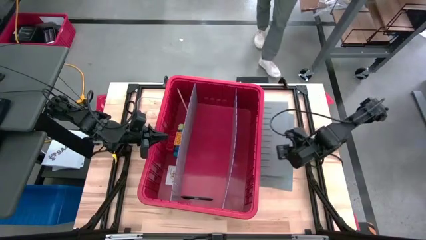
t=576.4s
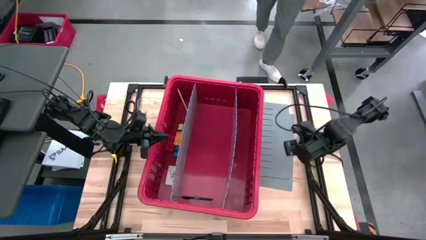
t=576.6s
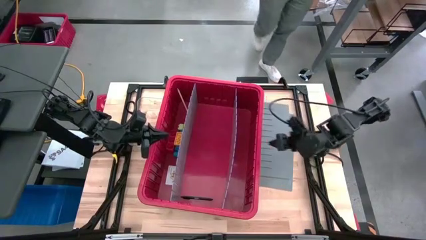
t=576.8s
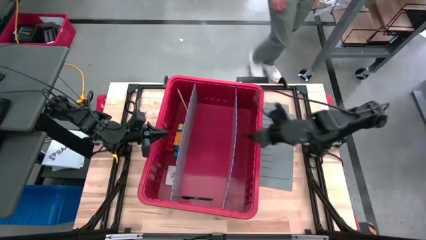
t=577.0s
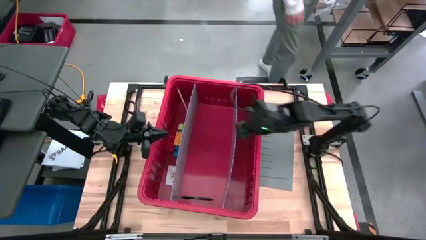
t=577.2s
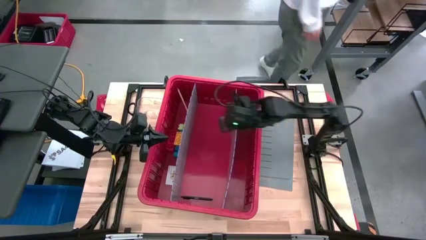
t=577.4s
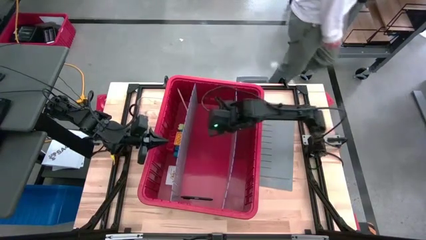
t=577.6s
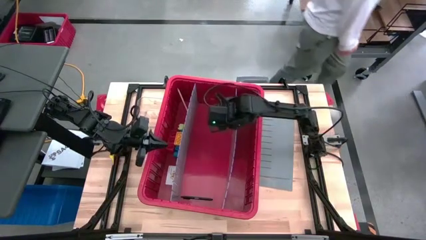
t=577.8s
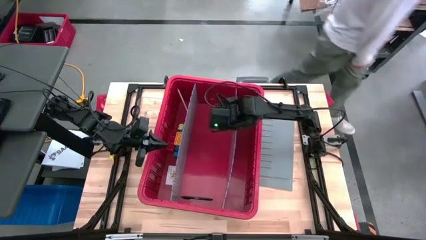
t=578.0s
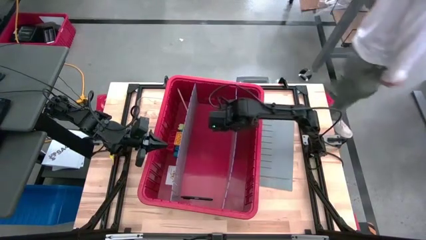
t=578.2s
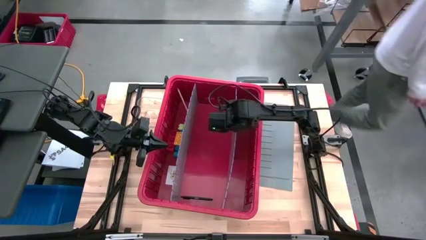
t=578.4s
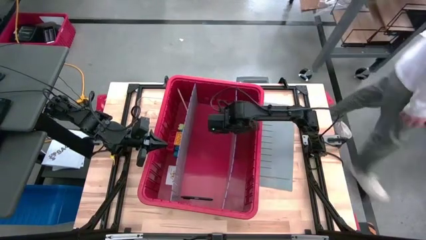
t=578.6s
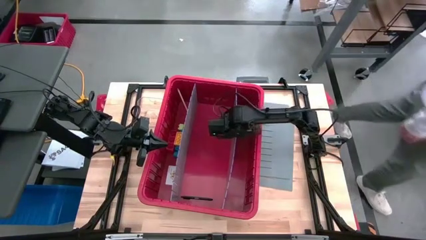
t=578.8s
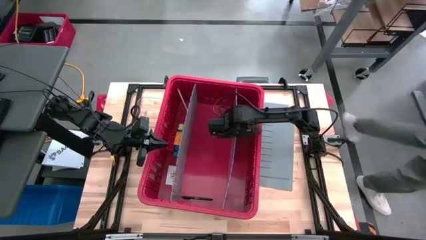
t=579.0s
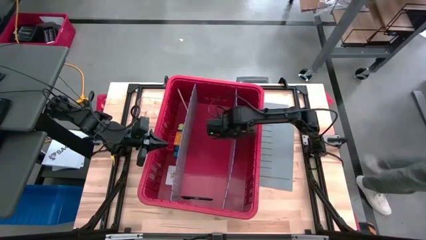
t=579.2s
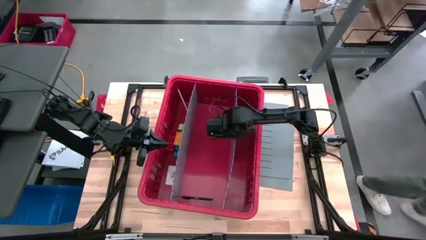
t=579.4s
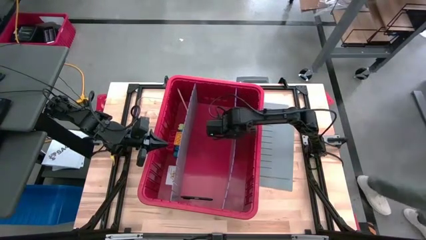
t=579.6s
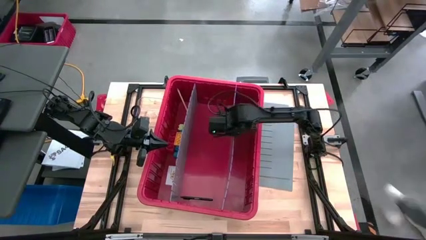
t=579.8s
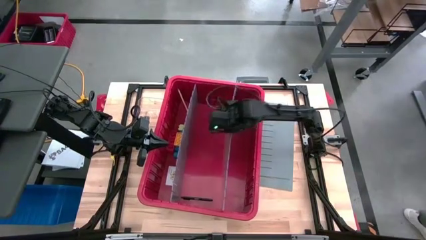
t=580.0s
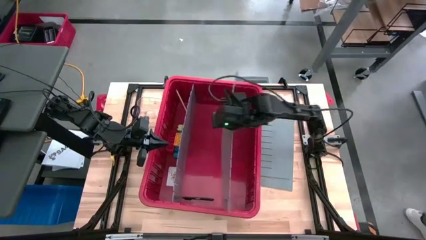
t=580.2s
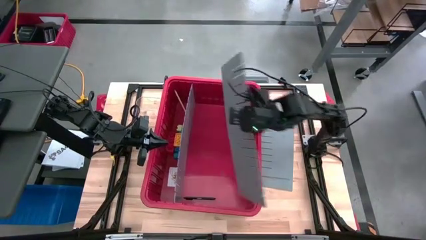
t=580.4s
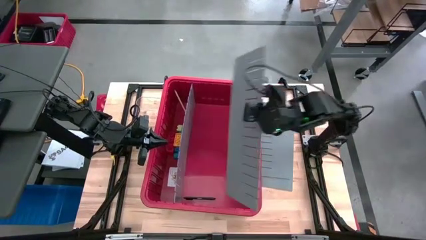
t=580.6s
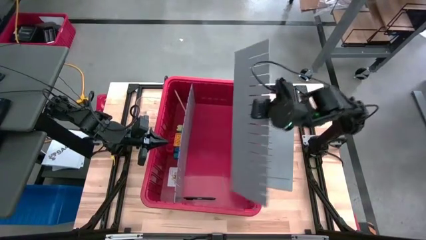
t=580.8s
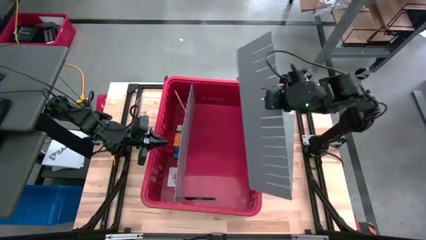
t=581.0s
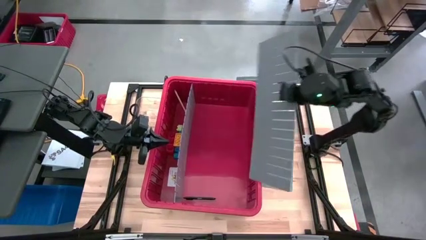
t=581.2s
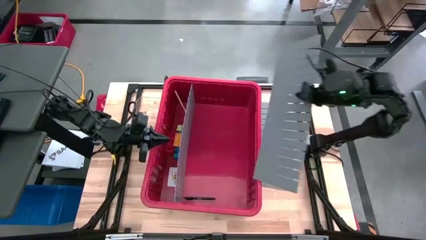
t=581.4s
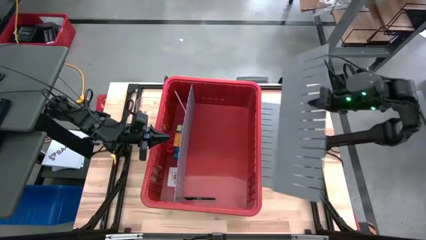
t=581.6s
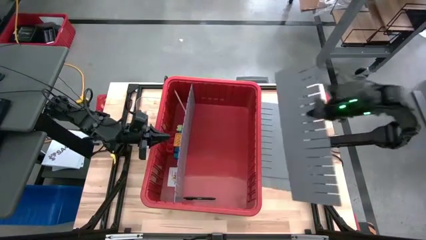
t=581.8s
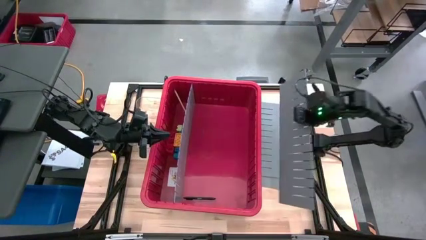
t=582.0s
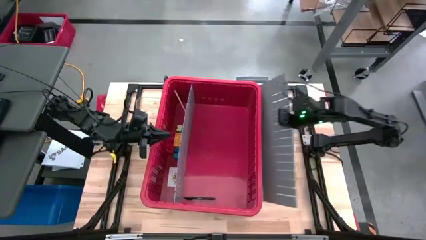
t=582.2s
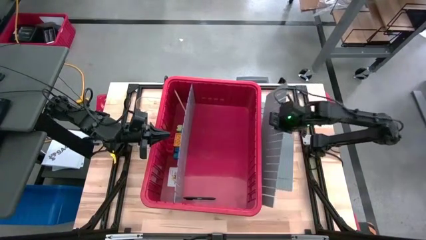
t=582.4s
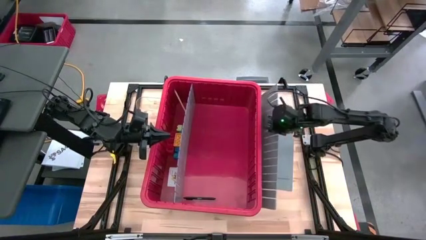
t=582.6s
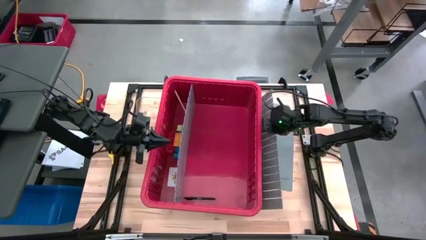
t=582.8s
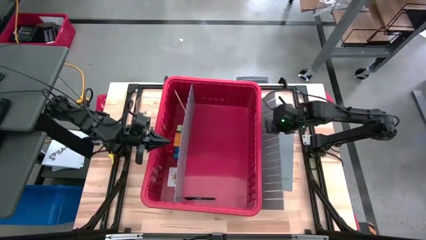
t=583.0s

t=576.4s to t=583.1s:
Task: Sort blocks
Break down the bin divider

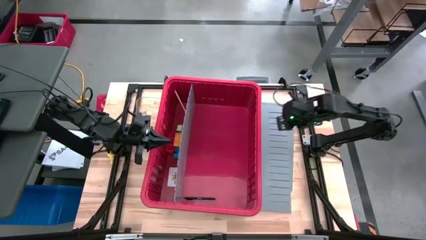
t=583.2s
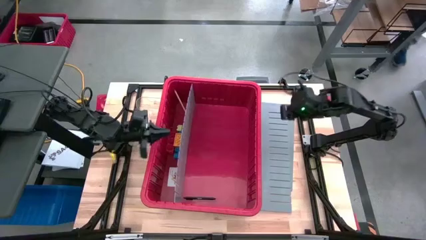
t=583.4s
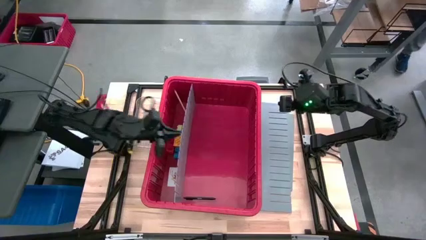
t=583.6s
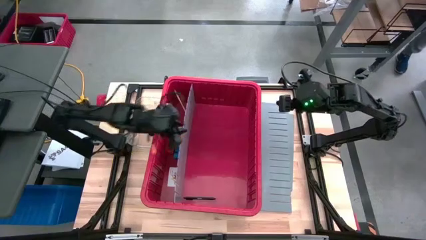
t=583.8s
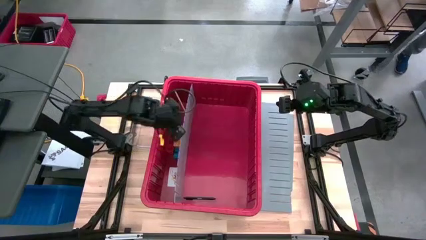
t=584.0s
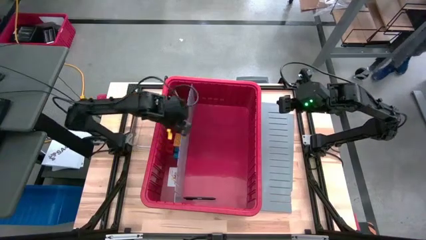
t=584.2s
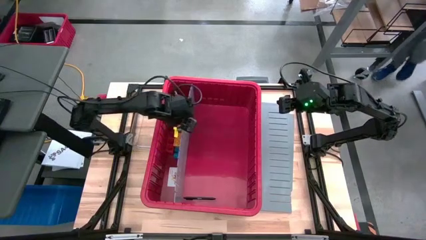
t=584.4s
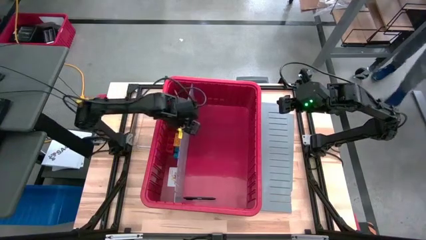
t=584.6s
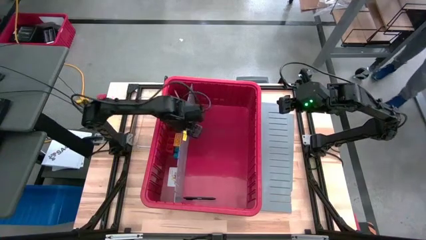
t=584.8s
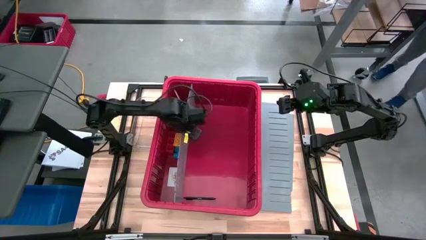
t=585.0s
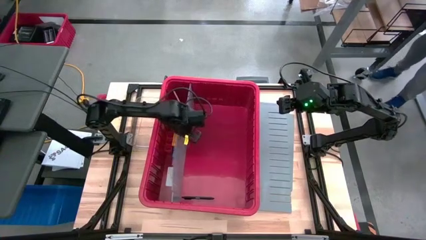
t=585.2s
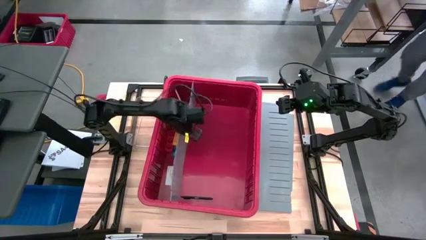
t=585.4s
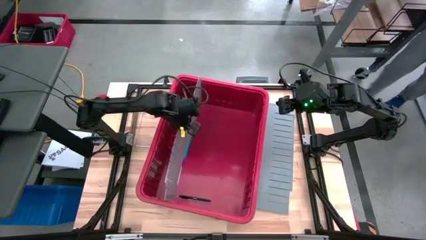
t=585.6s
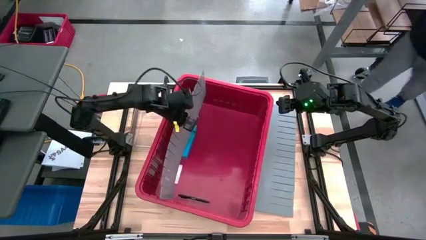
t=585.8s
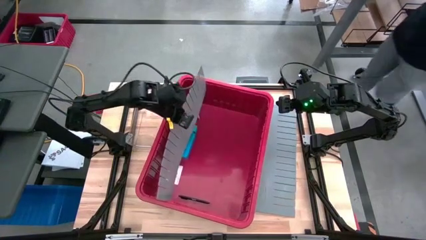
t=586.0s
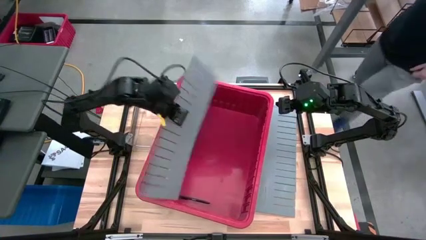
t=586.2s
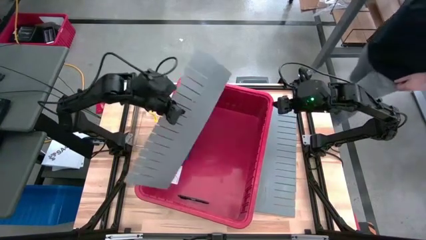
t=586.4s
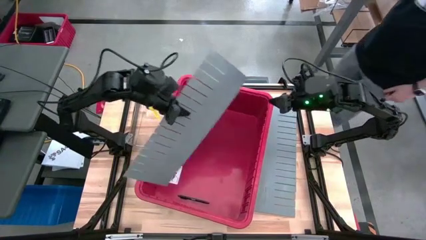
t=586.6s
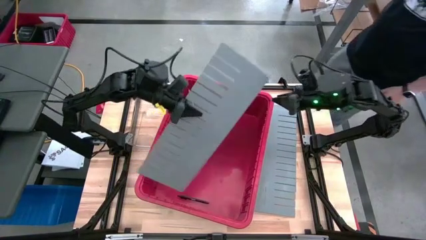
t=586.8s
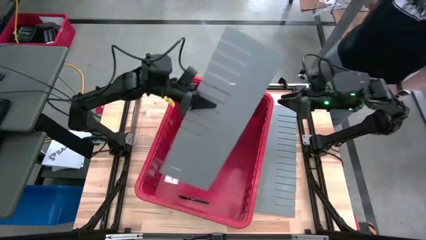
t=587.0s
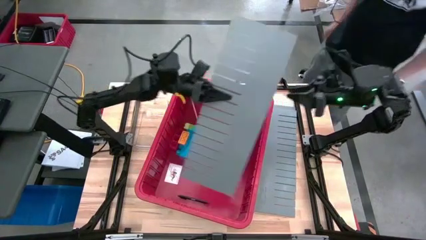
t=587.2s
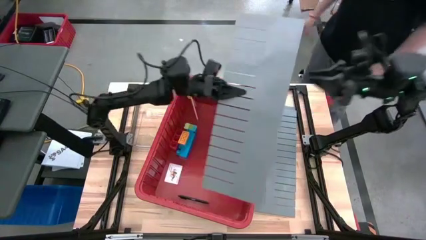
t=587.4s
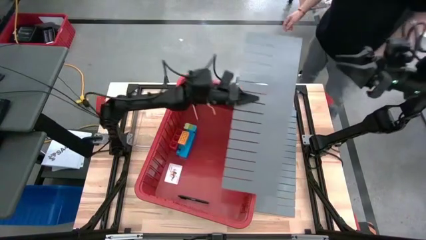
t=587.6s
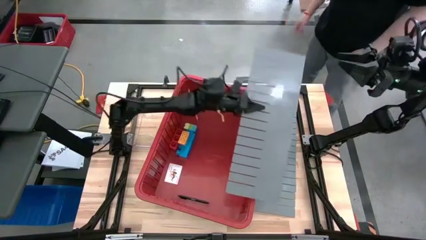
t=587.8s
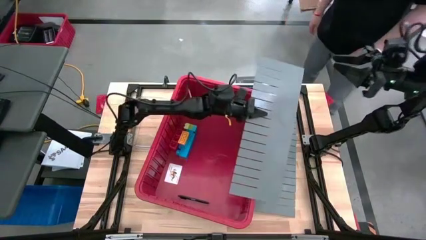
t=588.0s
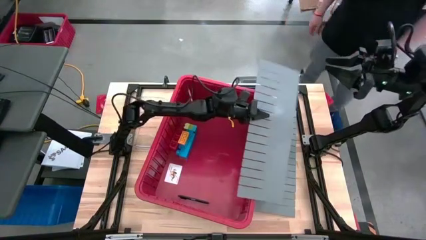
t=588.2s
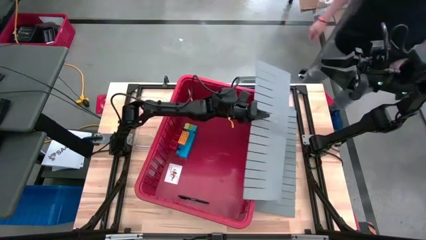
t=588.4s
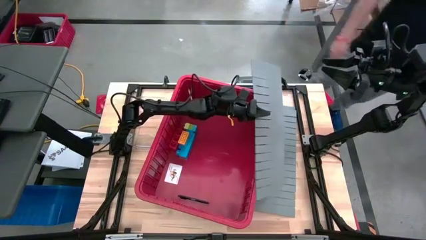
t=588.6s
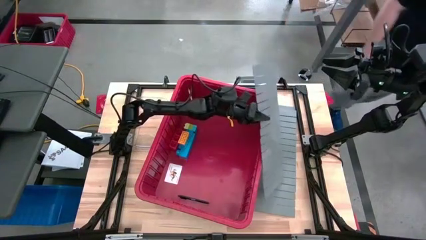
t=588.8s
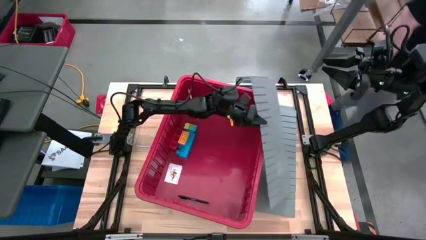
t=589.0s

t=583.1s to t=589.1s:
Break down the bin divider

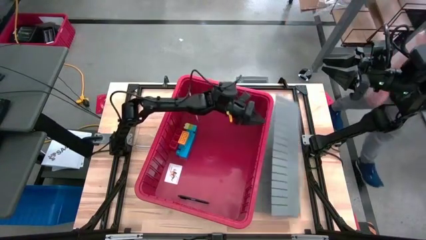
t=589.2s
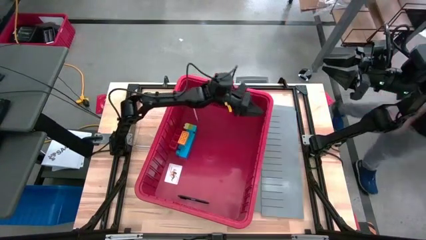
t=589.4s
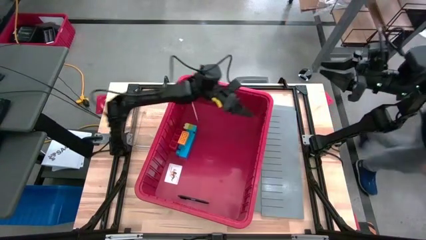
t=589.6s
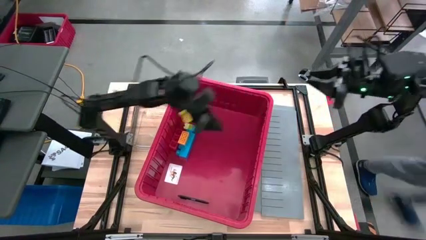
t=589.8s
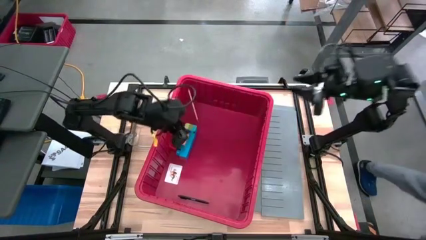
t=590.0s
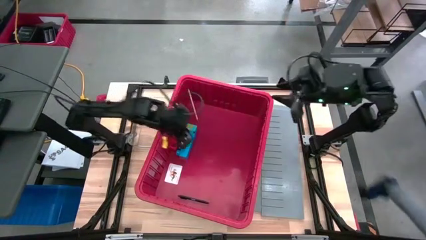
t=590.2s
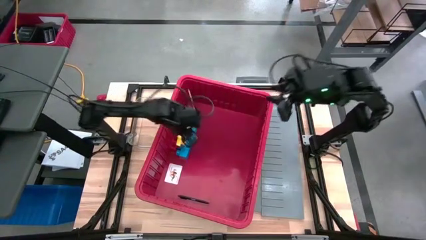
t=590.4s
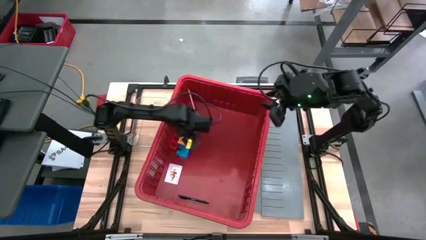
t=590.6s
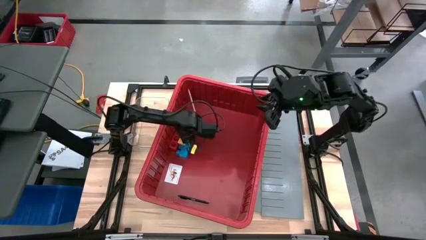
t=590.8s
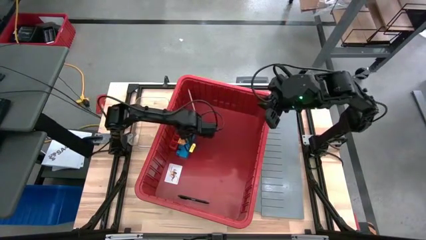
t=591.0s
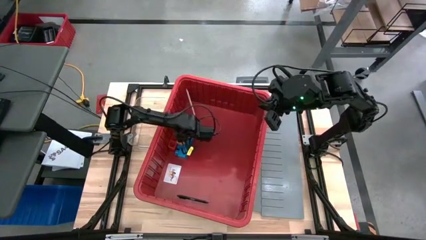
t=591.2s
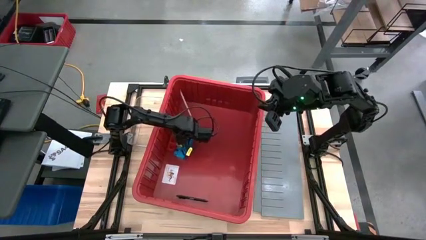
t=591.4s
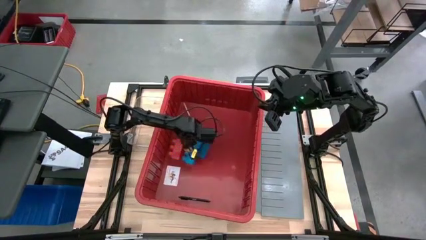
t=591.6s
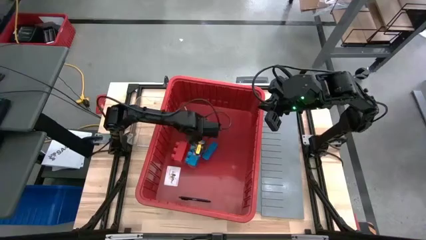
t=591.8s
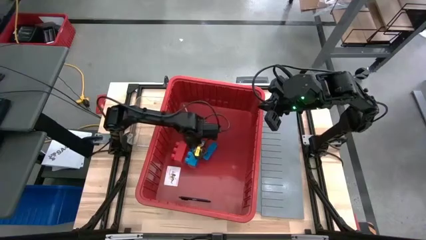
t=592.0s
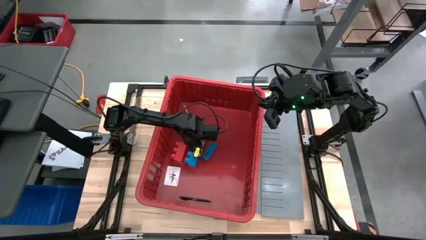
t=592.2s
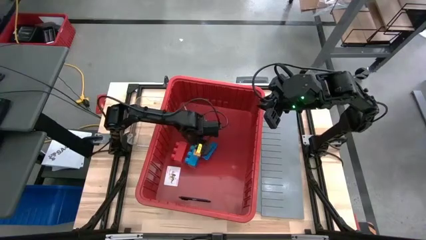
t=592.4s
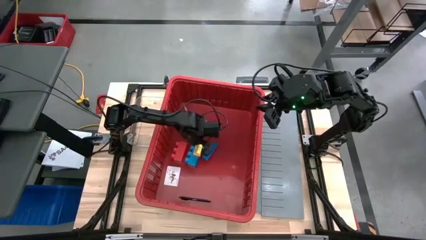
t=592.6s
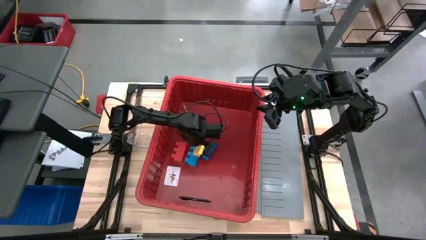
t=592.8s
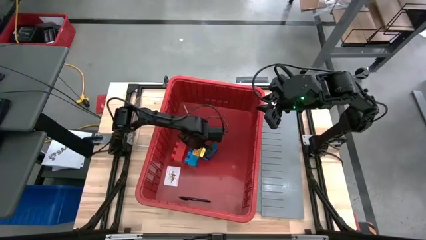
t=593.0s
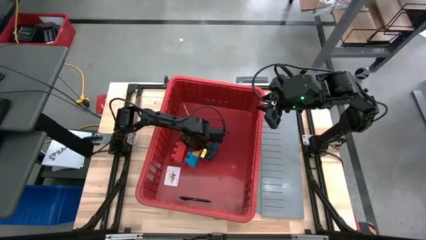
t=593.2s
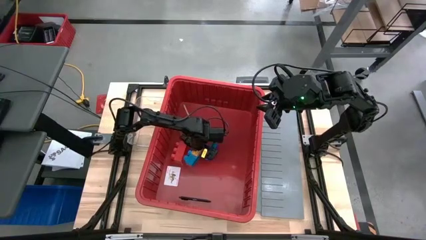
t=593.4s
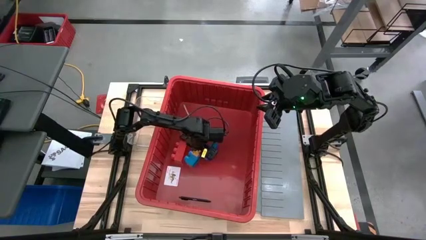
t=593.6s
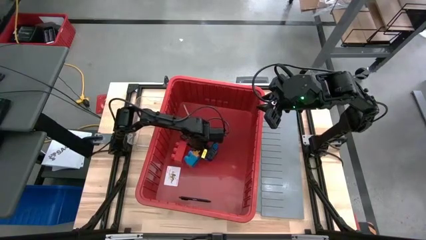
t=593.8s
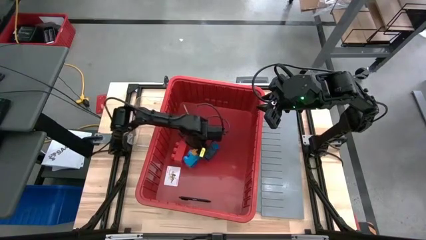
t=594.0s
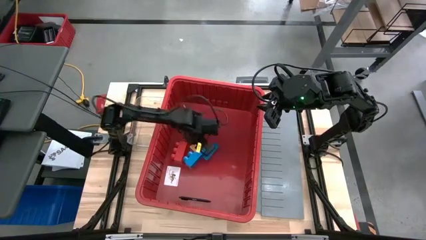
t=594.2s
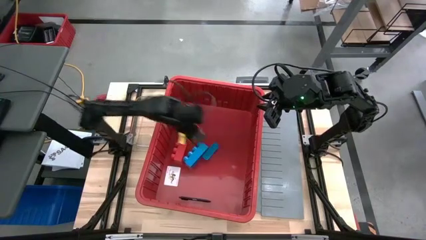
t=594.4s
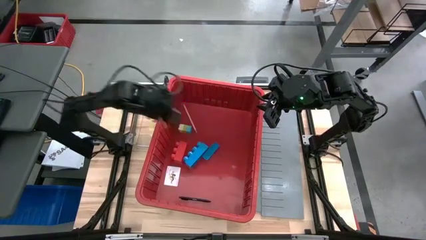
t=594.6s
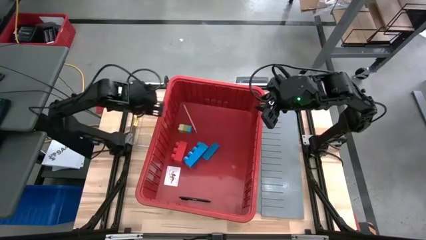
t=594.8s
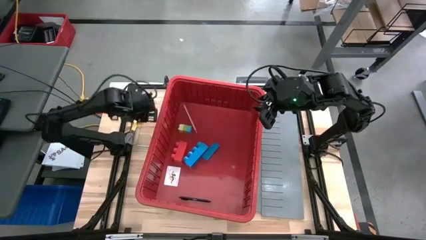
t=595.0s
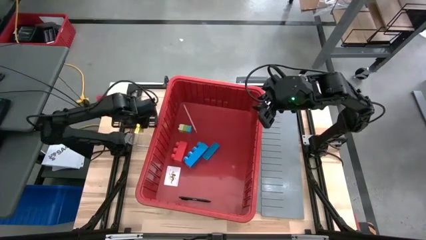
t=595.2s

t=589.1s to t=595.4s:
Remove the yellow block from the bin
